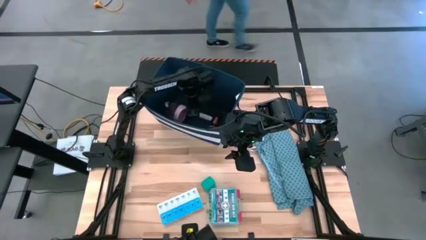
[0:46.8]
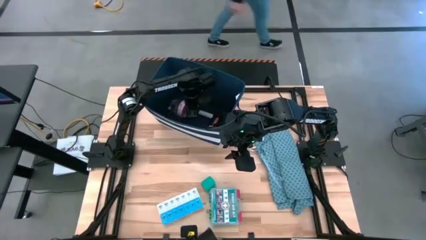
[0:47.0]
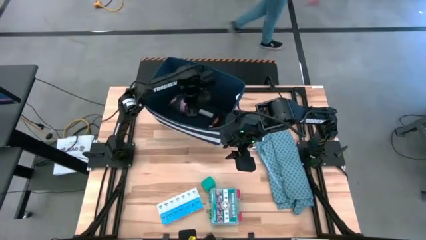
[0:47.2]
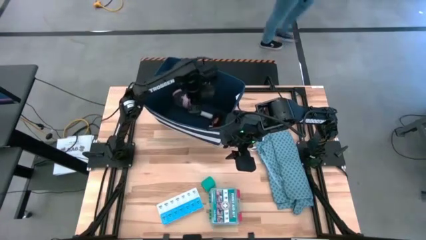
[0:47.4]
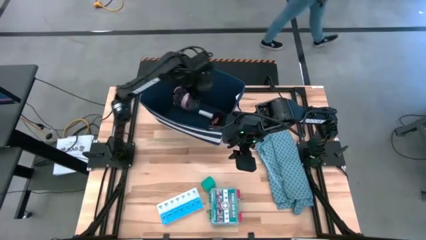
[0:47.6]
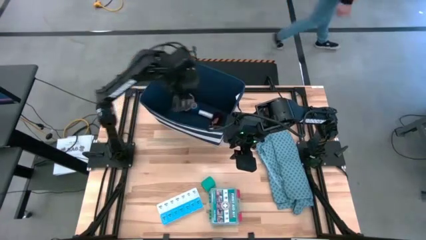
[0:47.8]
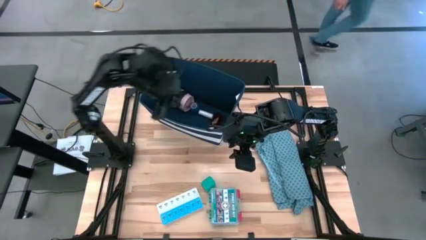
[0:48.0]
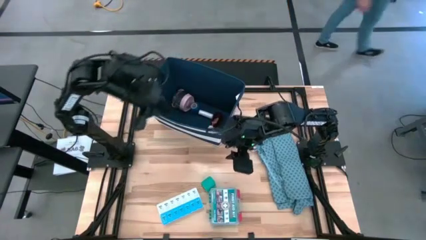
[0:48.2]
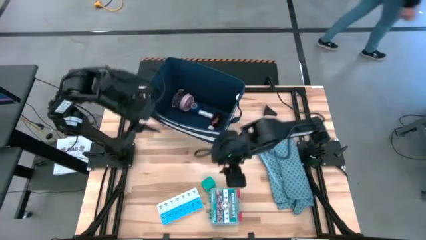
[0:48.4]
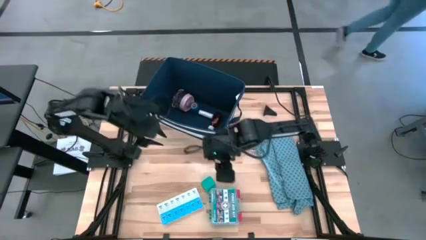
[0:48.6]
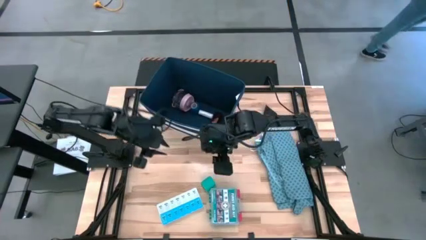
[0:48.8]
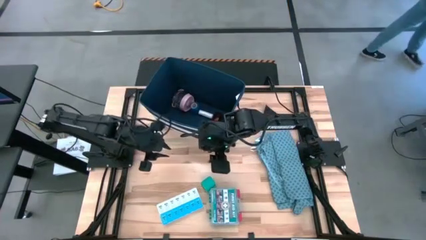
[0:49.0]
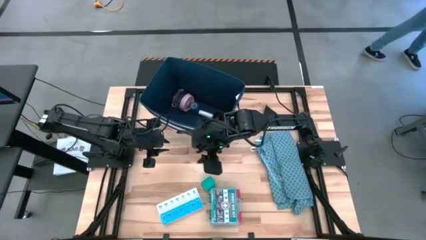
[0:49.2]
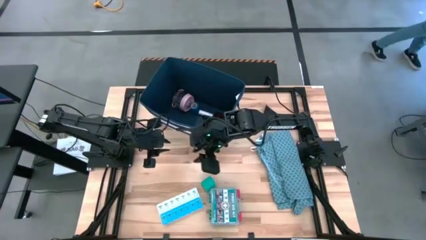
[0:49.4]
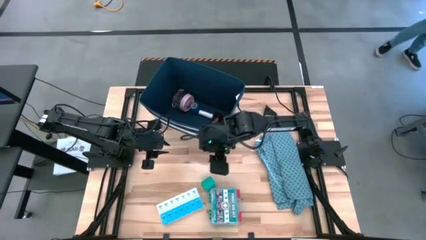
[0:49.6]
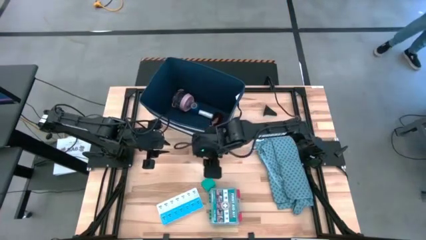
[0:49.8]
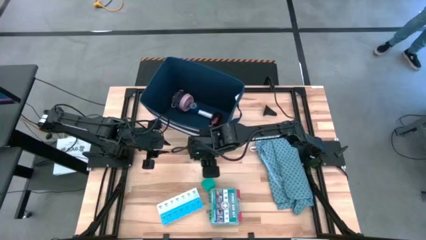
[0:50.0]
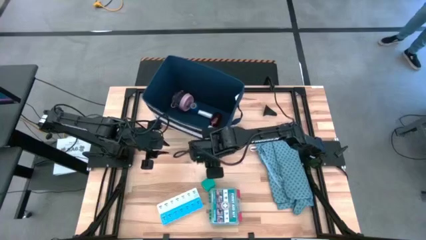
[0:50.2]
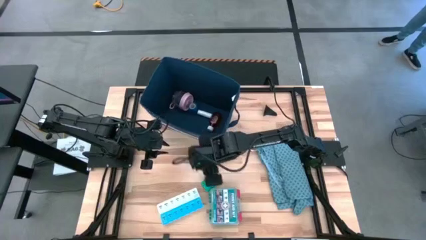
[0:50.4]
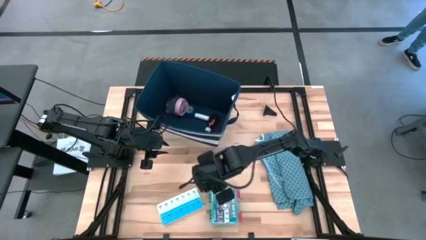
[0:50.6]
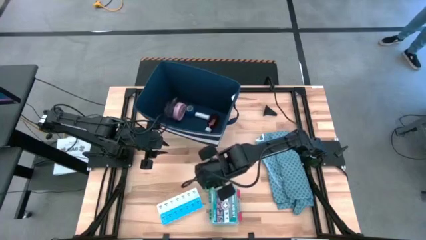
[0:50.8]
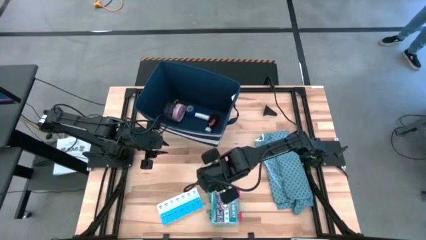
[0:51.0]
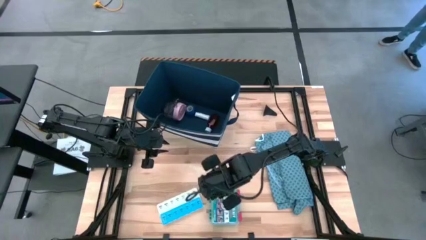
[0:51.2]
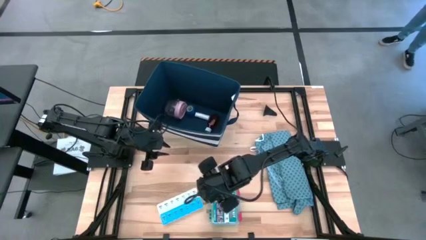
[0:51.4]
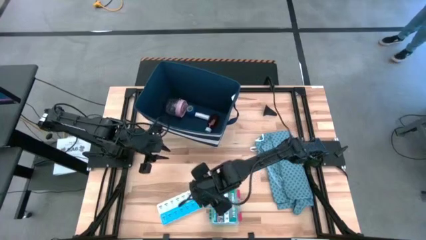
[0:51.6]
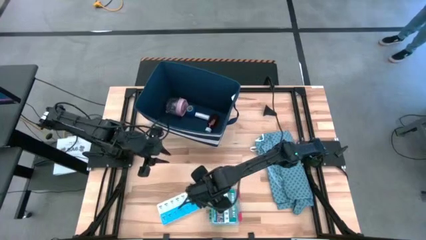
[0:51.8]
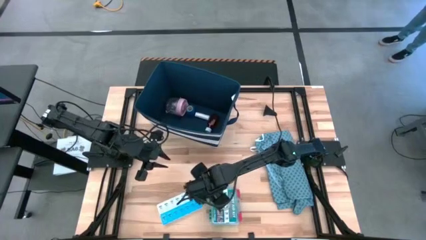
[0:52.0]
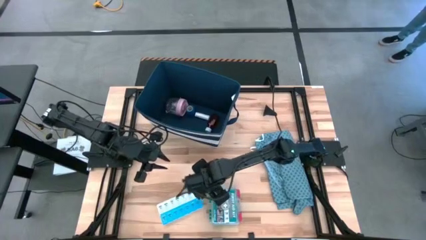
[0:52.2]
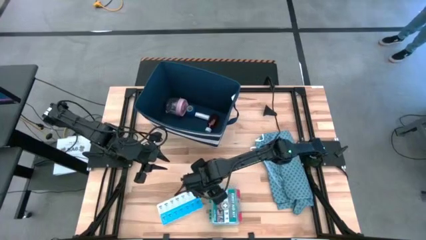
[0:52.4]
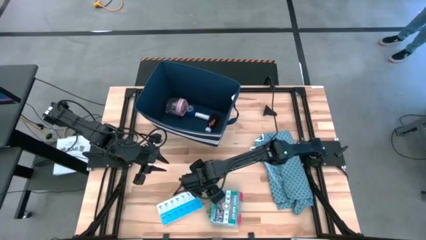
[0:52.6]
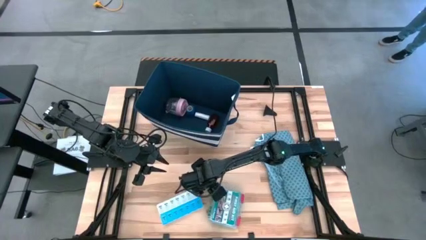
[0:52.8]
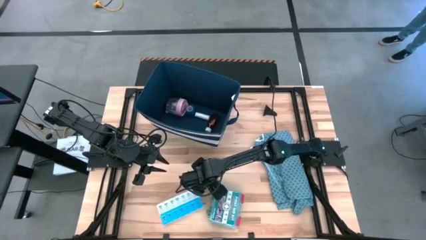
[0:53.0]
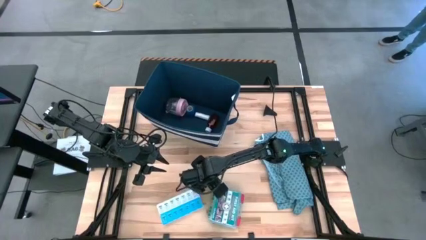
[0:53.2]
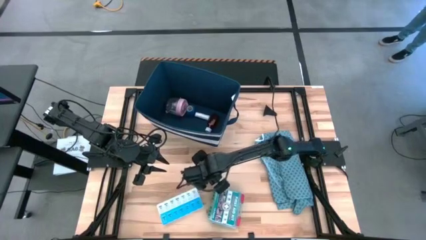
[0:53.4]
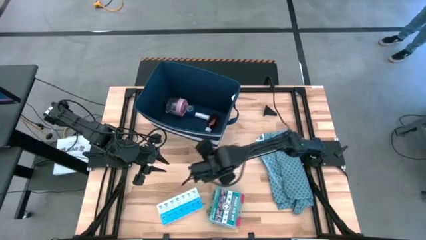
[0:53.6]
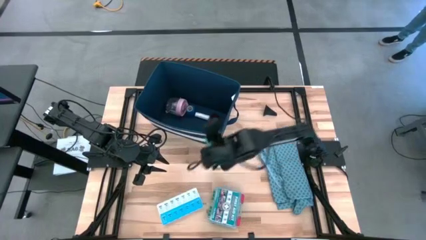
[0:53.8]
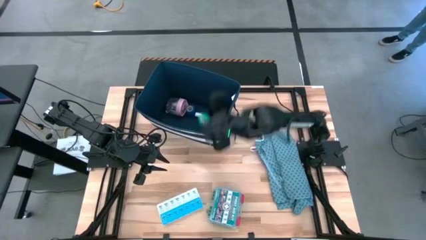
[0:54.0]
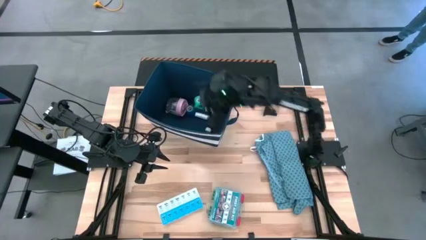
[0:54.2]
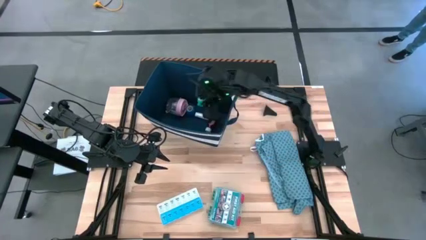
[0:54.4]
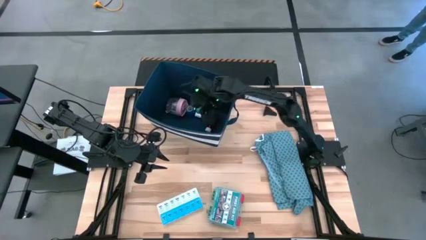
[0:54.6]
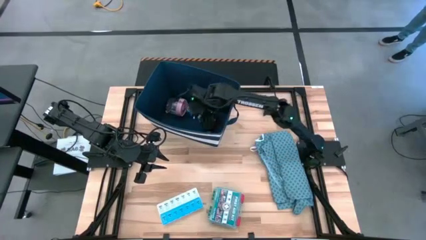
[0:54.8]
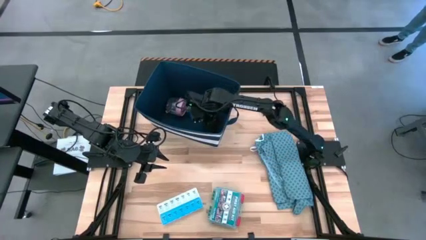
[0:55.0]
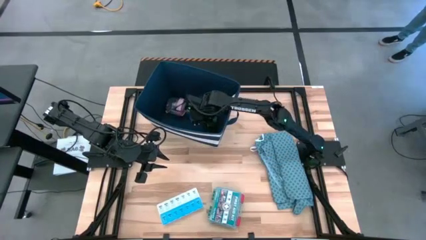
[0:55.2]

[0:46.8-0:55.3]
Task: Pick & place medical supplies in basket/bin
Put the green bandage into the laundry organizer

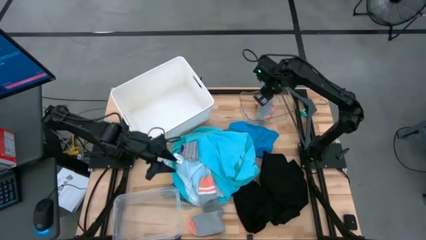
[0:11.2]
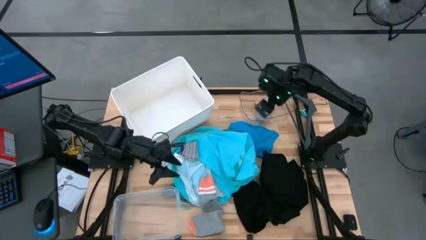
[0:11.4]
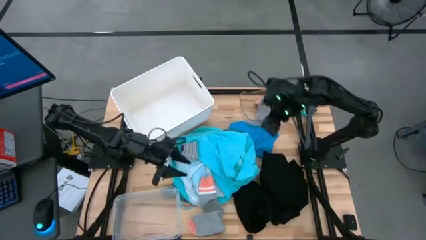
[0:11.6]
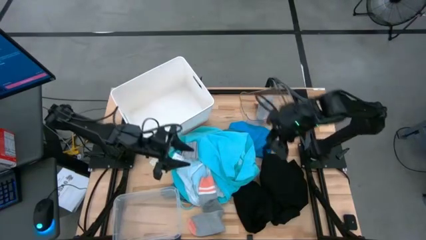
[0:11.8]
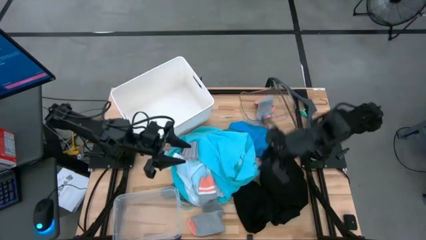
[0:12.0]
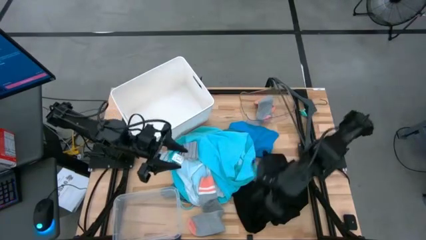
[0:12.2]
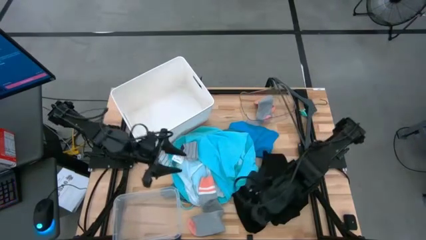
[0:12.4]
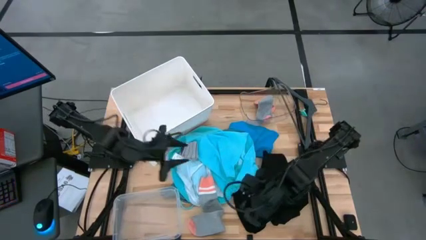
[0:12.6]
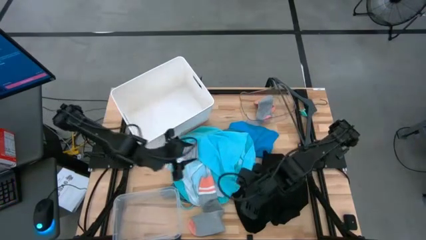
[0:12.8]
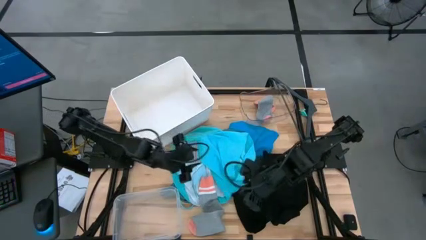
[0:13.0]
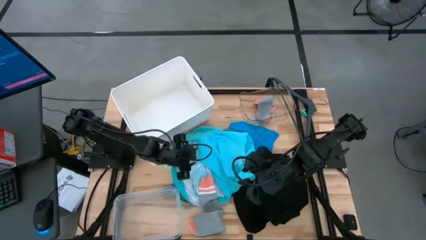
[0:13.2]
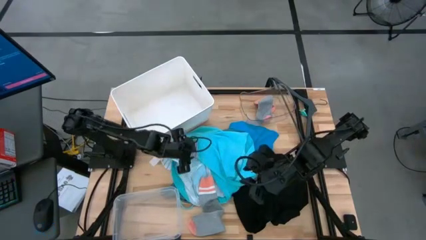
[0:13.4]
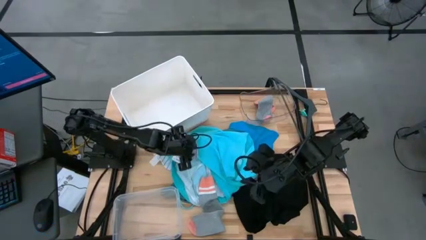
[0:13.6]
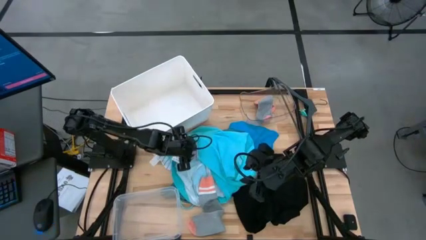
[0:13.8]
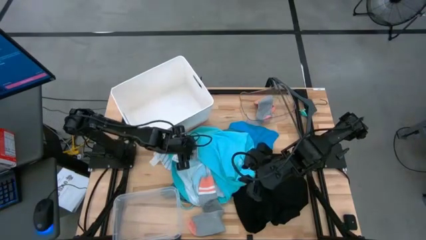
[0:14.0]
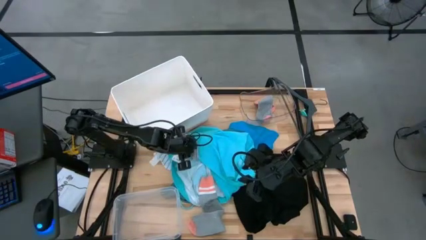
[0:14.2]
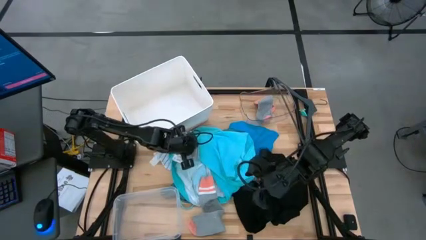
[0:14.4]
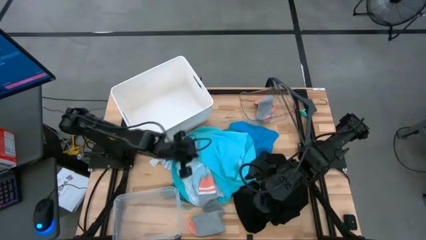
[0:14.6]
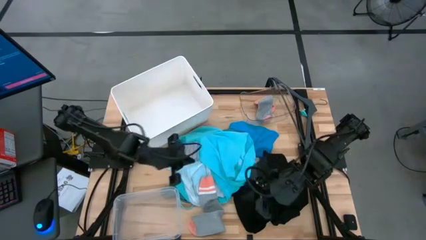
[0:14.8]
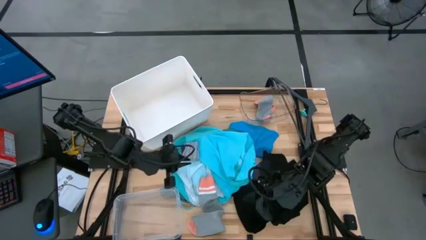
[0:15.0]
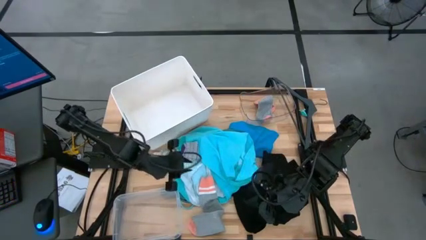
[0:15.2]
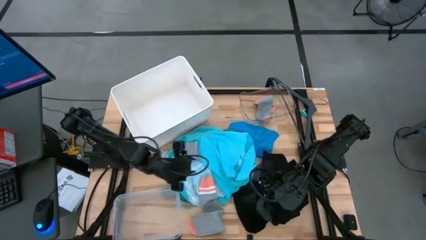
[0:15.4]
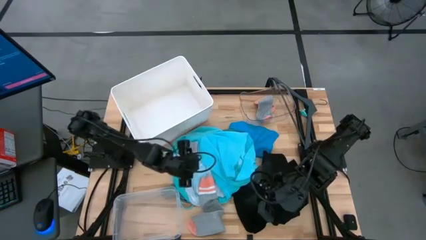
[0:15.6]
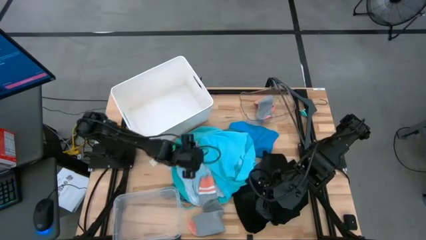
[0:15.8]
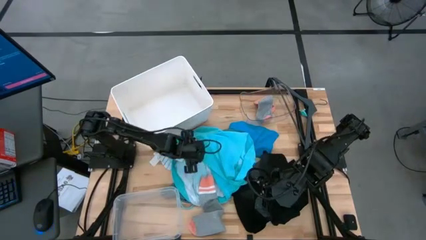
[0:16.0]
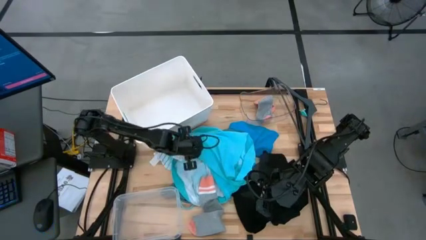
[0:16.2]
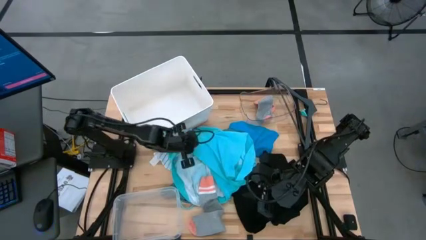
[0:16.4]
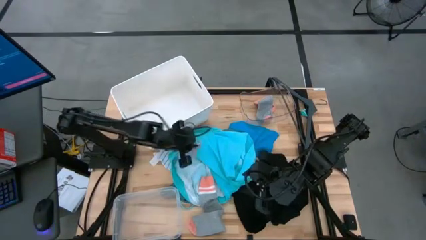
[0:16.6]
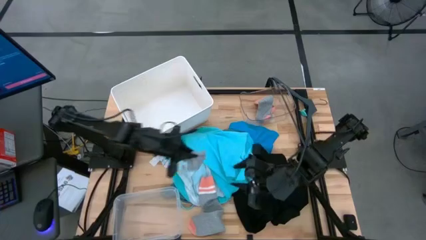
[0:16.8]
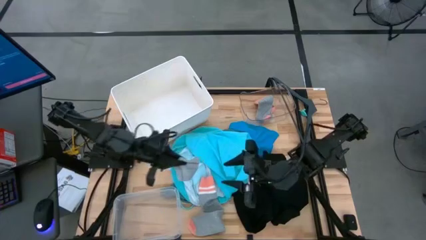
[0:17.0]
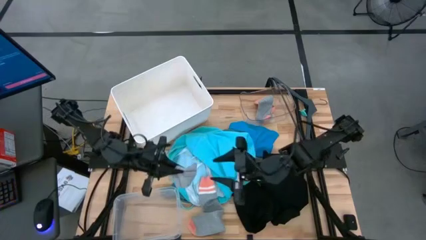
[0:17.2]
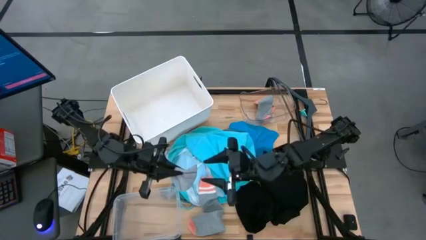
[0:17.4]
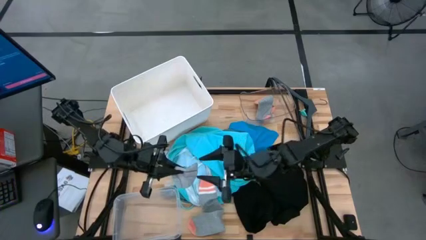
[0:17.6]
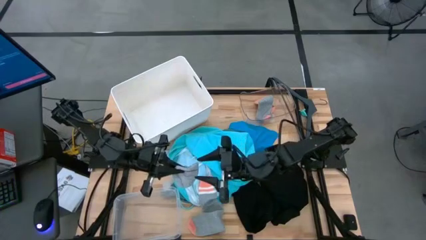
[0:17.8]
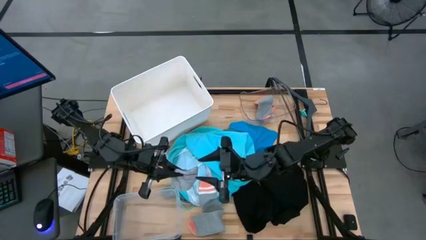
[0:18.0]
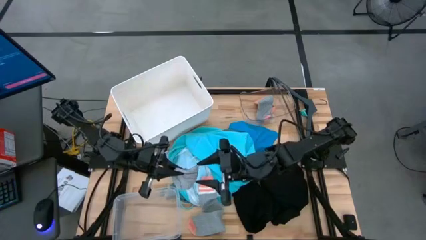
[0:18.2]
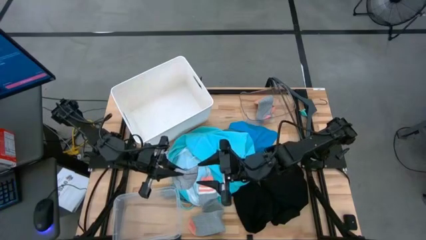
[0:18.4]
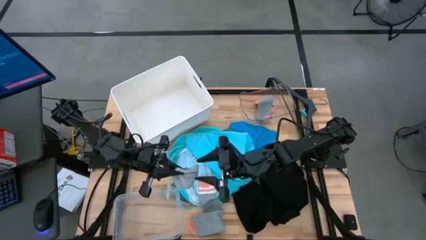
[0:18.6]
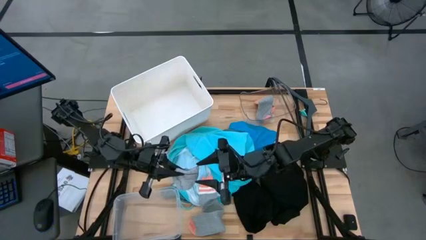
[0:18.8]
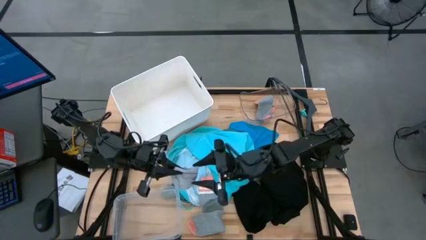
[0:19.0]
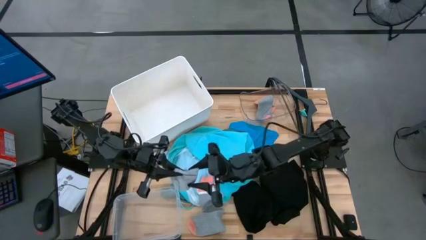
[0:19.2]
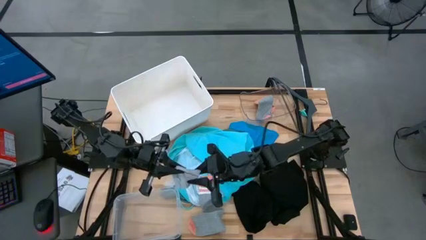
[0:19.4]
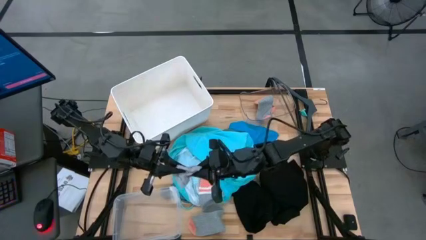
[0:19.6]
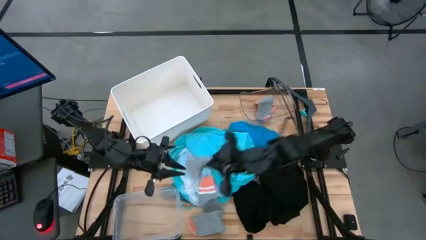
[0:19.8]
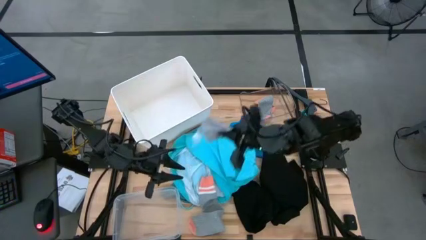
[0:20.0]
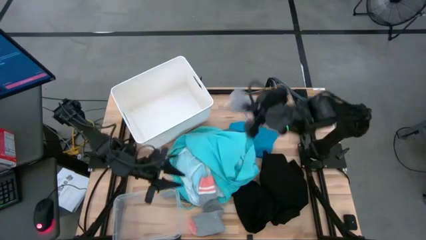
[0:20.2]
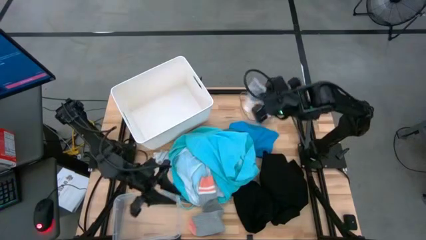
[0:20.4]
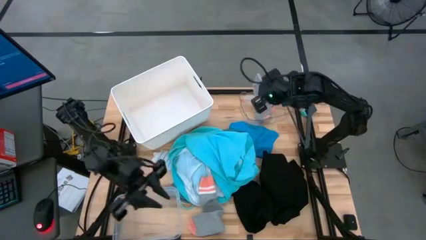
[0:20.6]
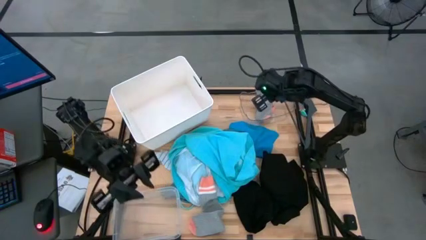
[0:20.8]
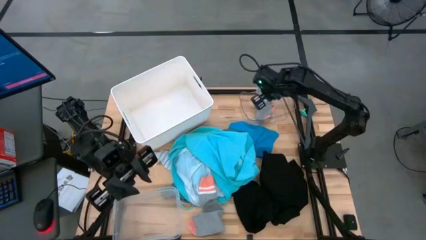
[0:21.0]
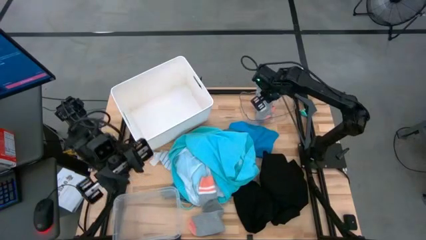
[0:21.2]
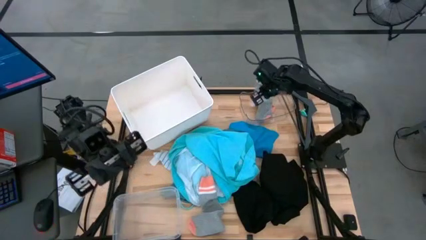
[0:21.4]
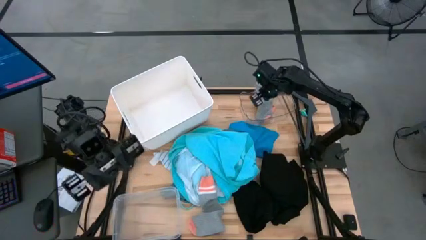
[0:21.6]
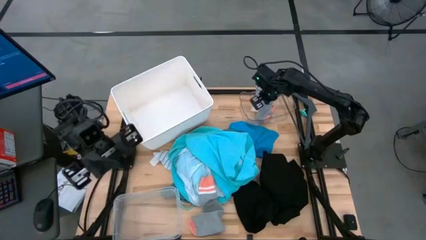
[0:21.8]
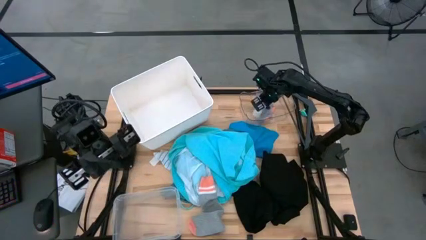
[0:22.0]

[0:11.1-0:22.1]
Task: Pick & Place Cloths
Put the gray patterned sock into the top transparent bin
